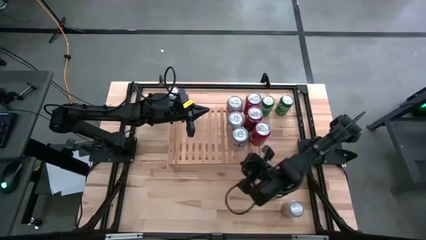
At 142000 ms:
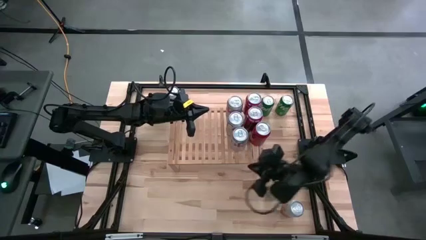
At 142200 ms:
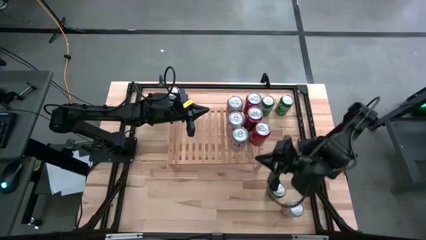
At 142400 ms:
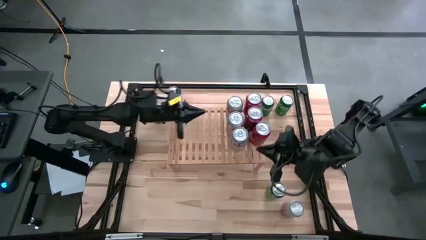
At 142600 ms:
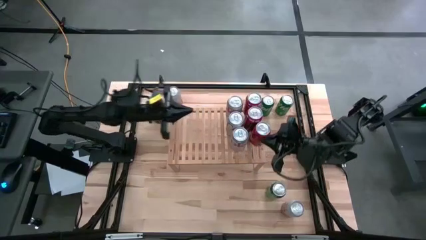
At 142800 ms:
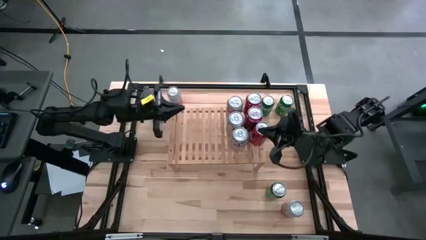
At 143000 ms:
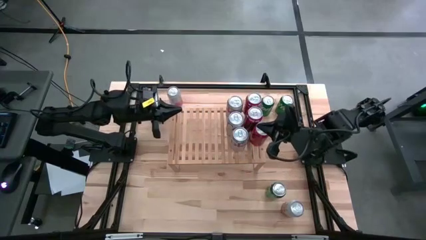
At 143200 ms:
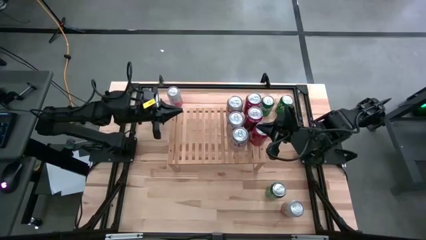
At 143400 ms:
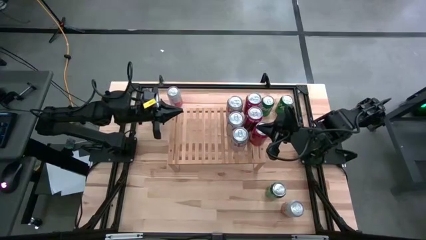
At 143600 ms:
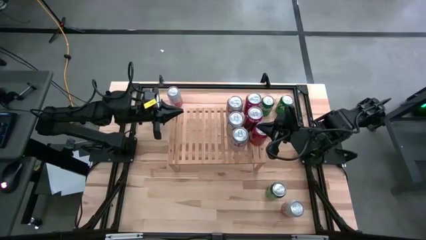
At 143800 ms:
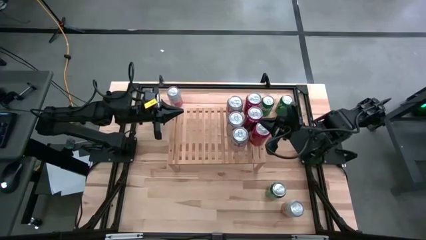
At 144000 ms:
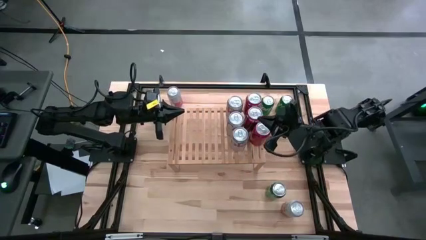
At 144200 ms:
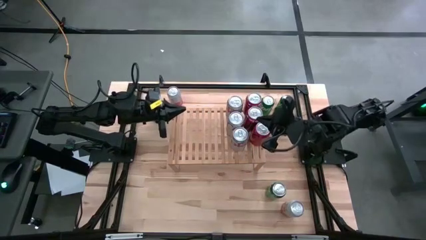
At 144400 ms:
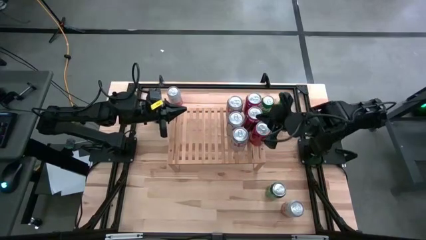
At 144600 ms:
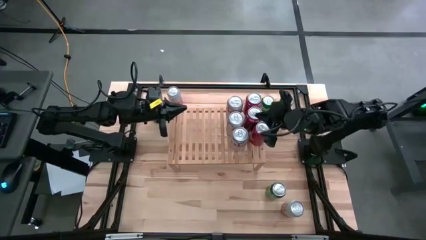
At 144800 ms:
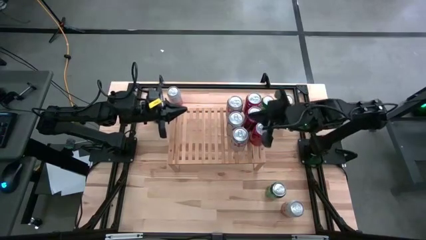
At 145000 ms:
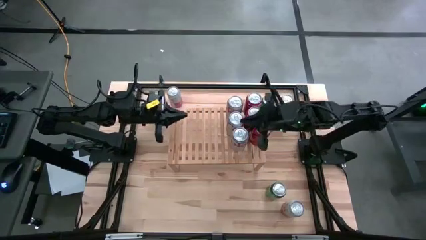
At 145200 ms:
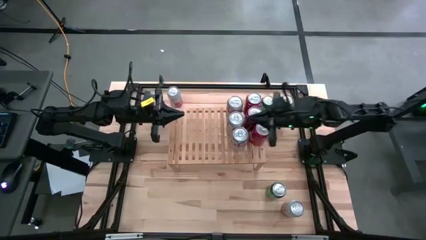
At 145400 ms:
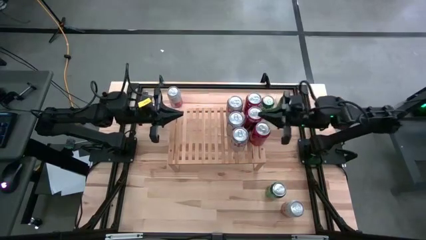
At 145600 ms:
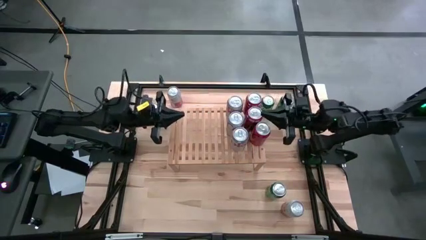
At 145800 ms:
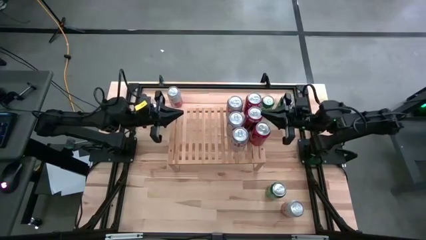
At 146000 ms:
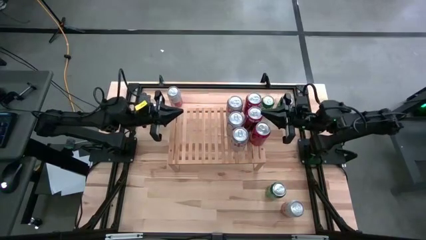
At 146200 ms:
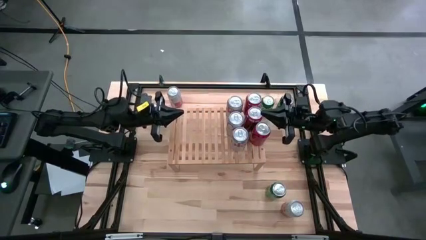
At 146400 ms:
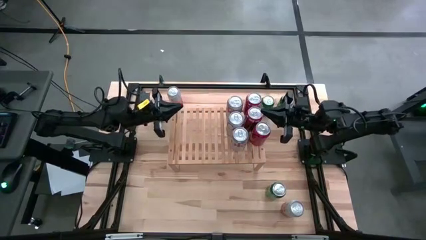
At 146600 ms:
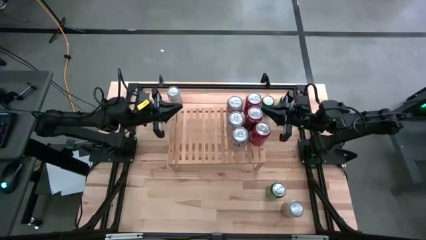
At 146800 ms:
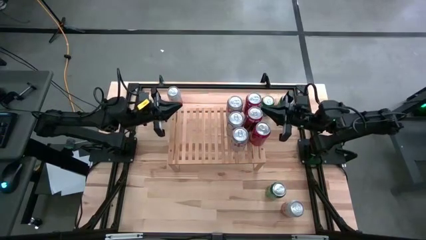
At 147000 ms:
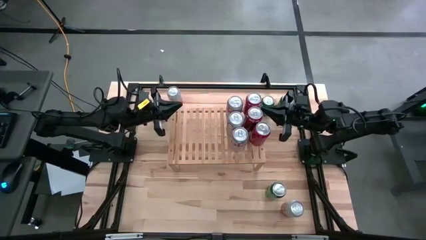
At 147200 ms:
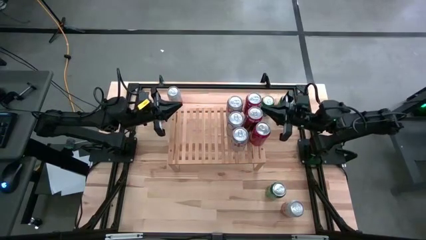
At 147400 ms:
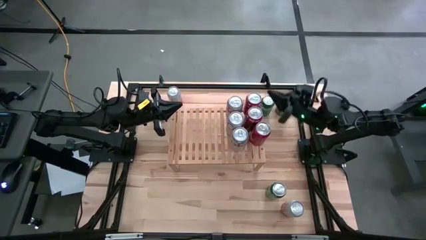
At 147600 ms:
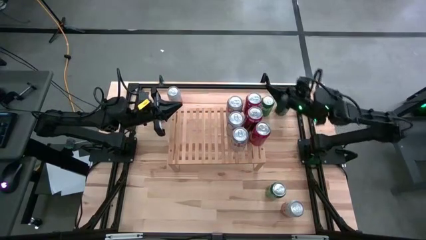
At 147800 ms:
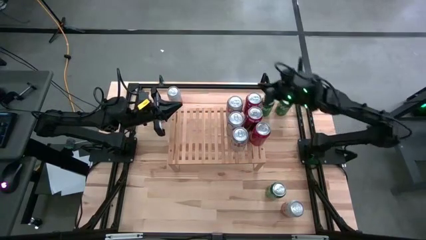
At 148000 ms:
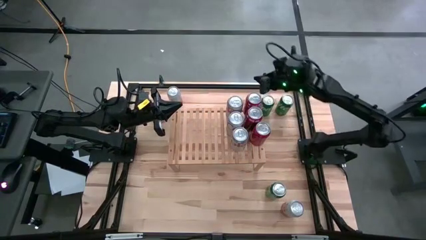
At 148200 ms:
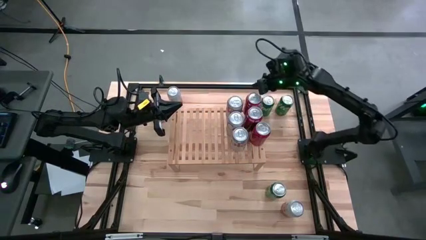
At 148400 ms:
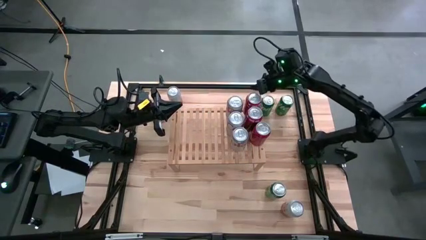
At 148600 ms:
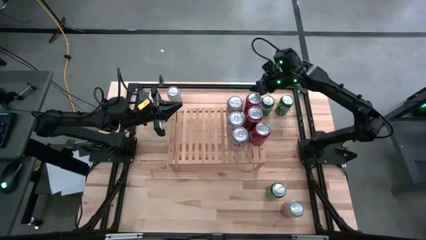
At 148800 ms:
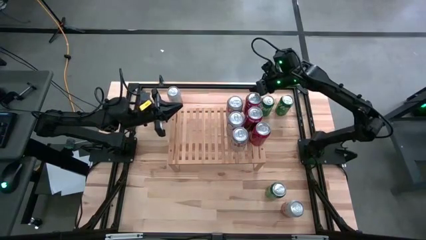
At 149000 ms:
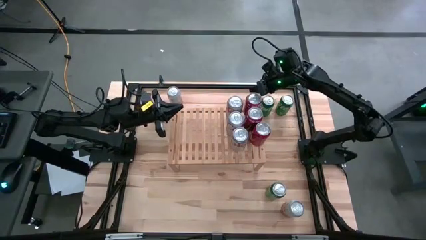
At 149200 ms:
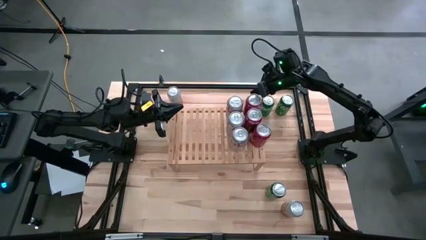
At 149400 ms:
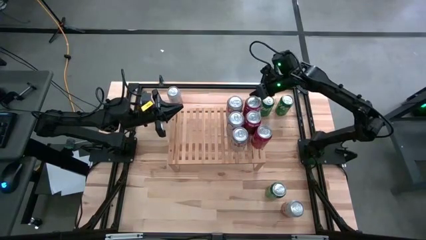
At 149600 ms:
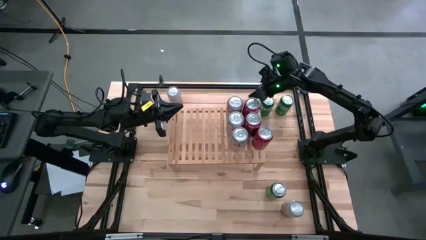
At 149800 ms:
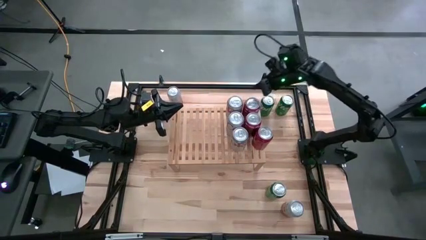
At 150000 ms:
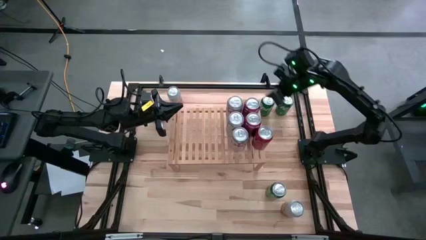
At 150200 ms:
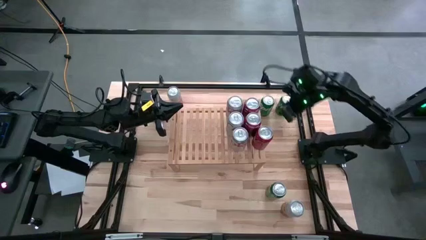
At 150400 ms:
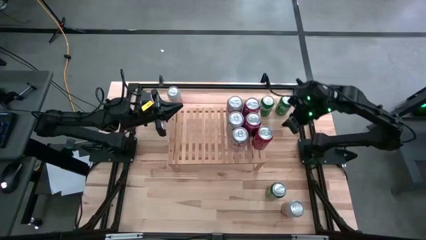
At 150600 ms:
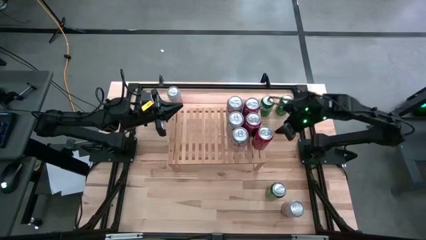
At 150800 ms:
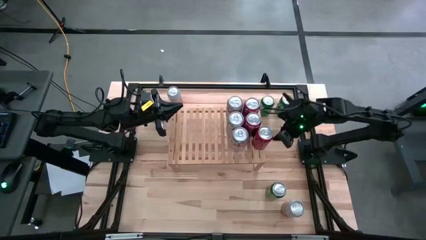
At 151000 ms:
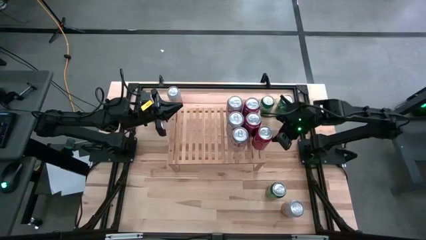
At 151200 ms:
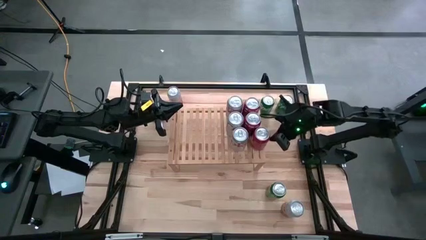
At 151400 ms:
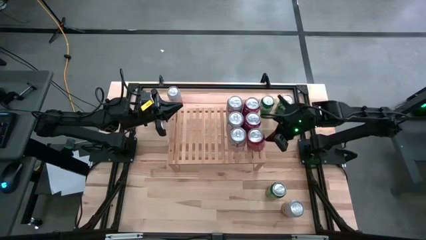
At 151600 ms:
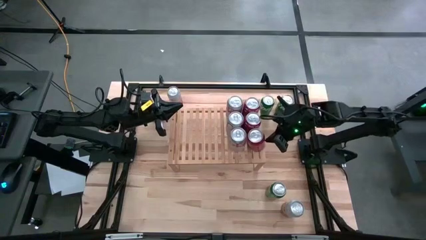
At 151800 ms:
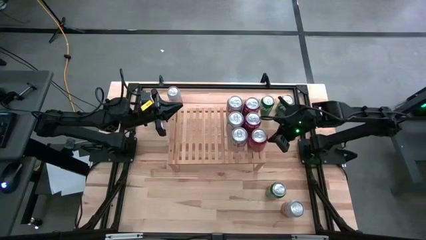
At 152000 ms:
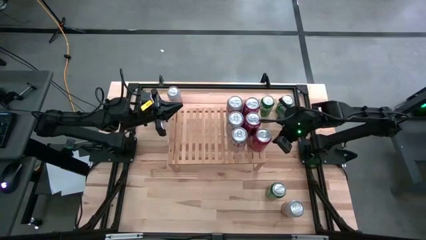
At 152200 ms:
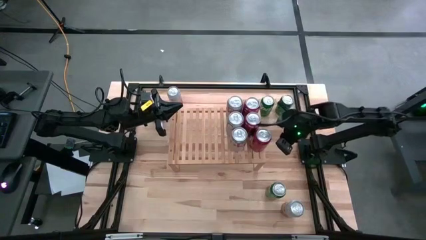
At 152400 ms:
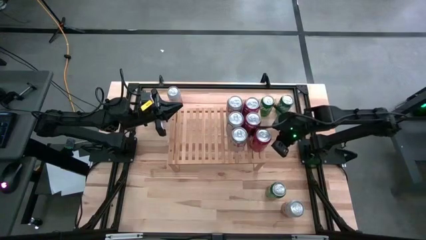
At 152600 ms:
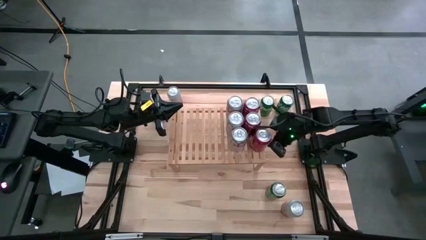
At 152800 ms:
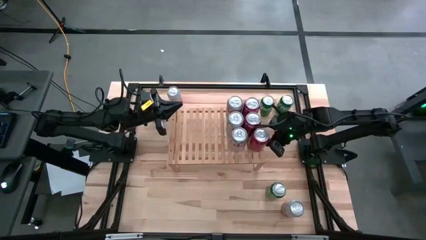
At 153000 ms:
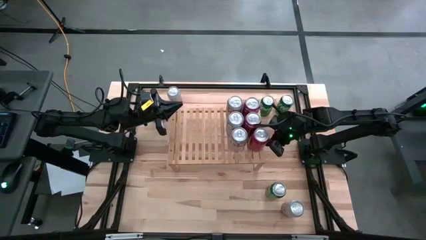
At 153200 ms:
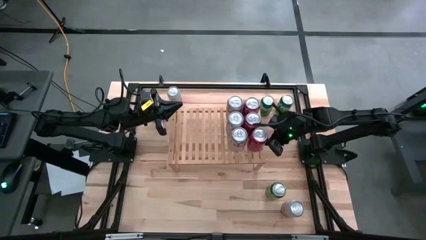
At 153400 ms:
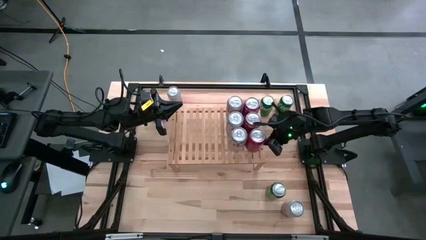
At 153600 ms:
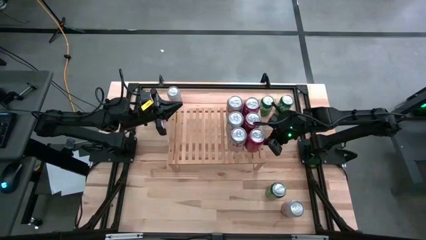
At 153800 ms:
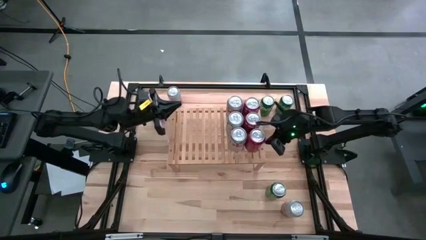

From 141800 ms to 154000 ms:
Task: Place canned beverage on shelf
Adjust the red soda cans on the shelf

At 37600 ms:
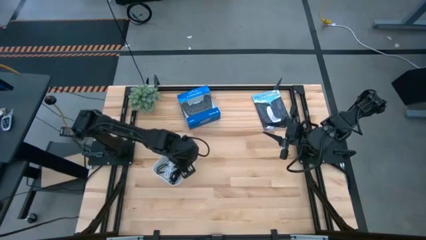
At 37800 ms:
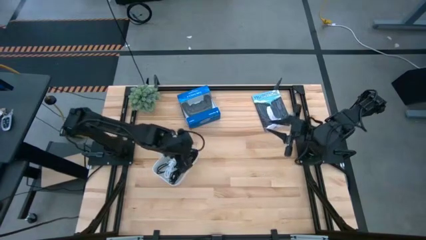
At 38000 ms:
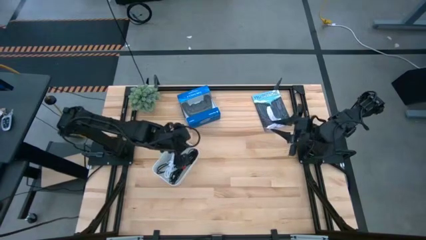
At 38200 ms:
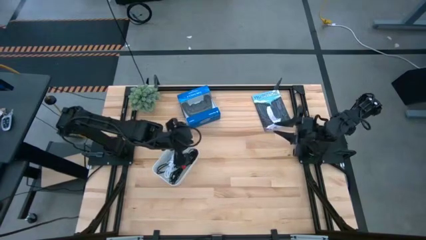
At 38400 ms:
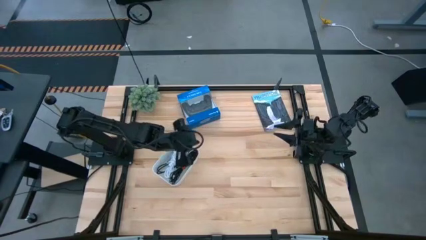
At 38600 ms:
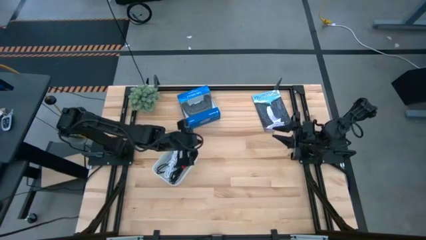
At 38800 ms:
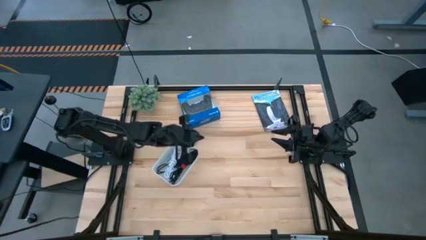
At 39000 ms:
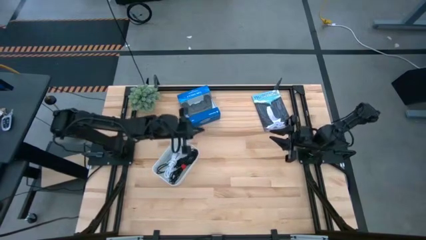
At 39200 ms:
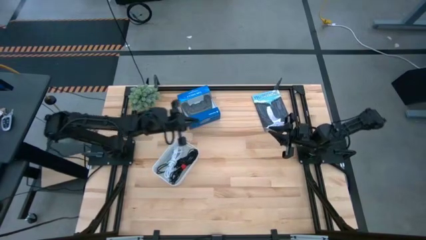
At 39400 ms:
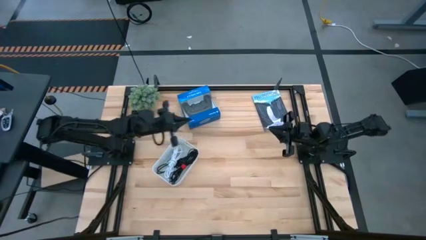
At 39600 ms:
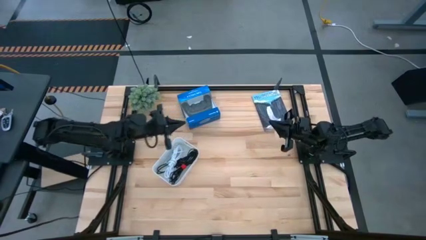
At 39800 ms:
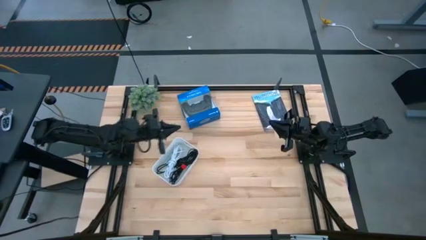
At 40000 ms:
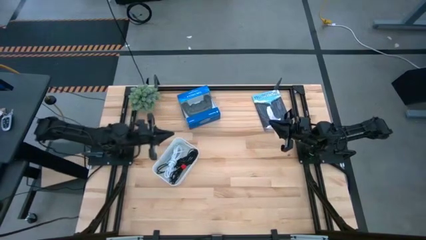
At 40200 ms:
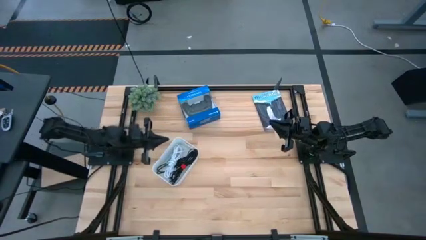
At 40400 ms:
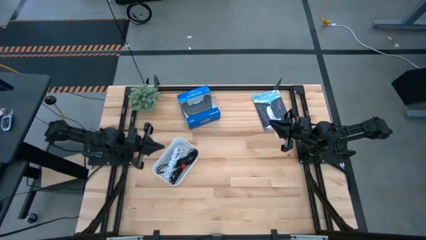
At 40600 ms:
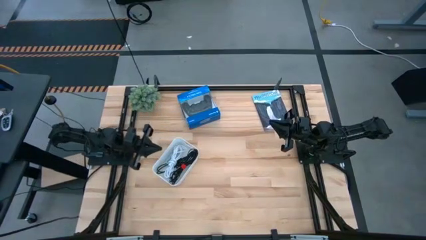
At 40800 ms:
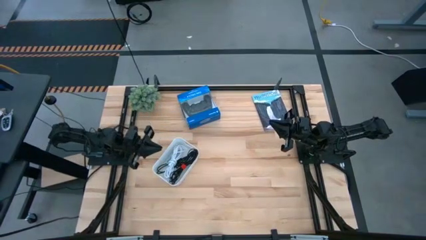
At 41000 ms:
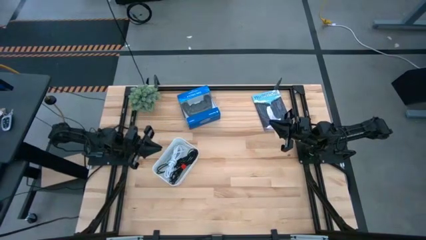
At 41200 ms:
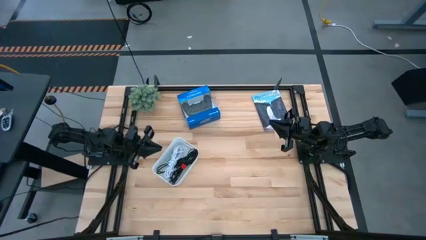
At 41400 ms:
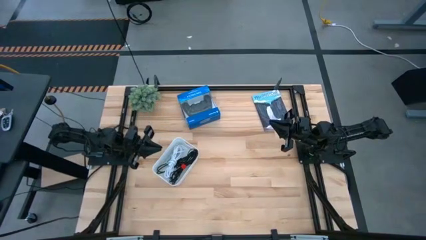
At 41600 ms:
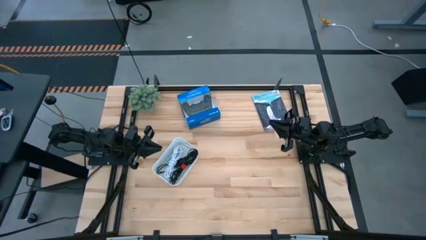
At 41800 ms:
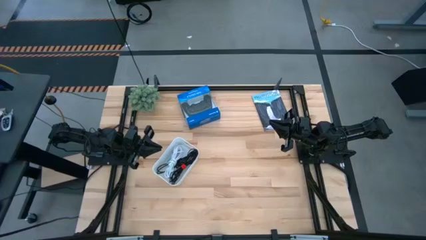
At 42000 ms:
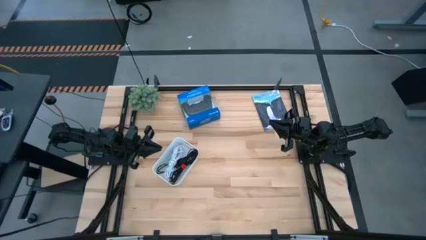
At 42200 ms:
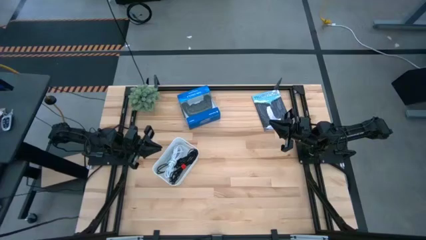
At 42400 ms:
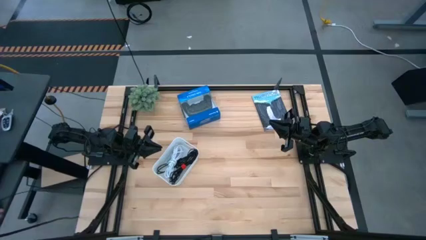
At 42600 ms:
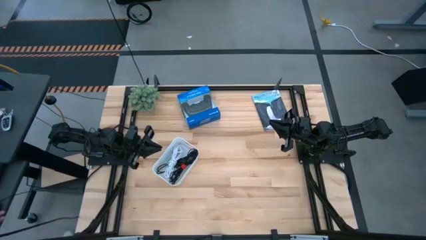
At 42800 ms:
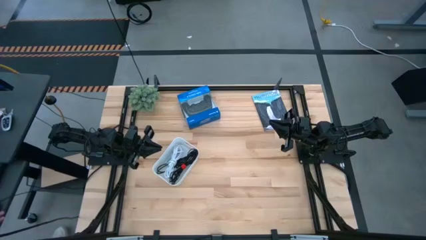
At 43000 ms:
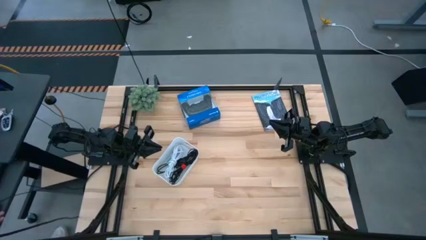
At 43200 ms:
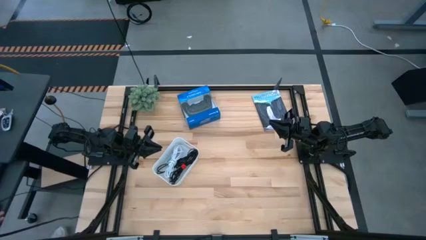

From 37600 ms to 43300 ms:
Task: Pick and place USB-C Cables
Return to home position
